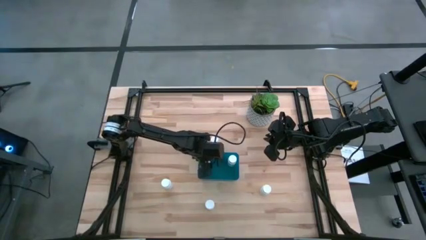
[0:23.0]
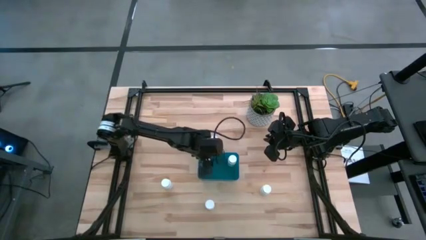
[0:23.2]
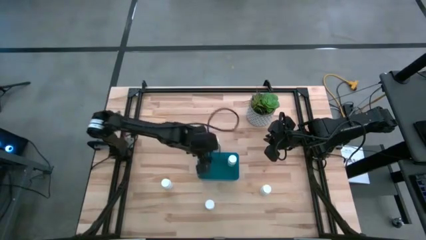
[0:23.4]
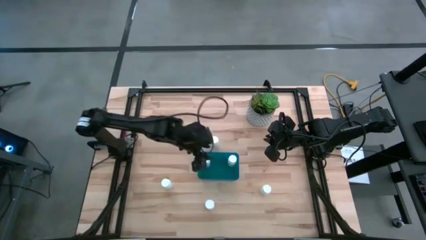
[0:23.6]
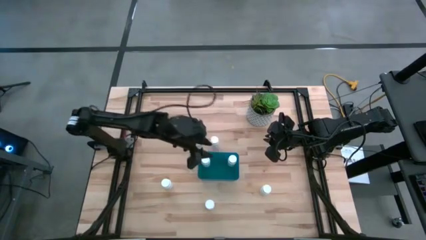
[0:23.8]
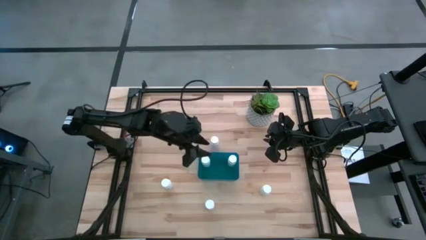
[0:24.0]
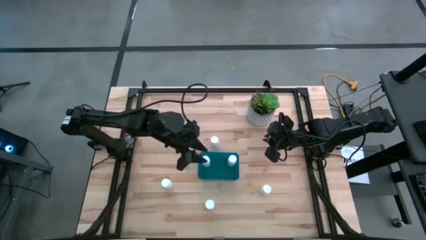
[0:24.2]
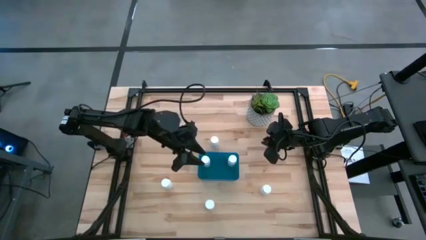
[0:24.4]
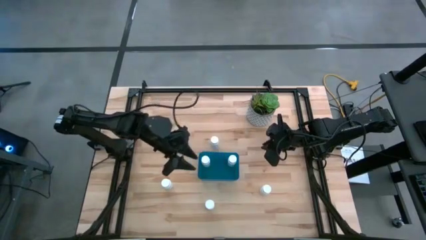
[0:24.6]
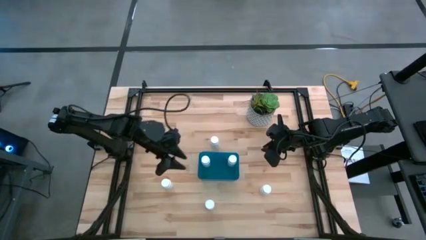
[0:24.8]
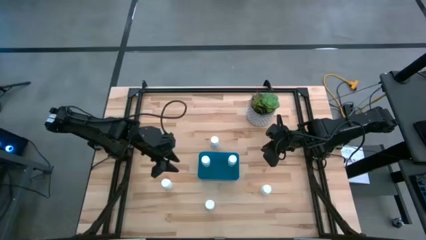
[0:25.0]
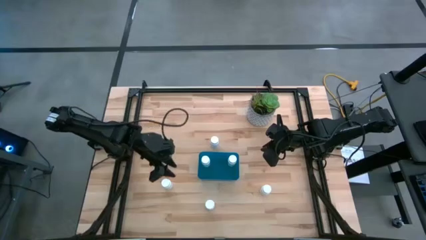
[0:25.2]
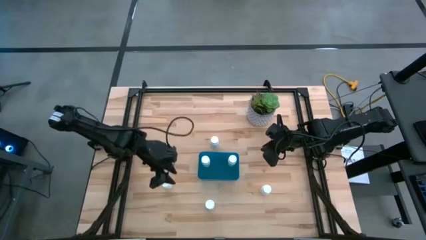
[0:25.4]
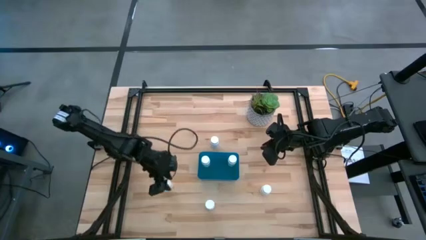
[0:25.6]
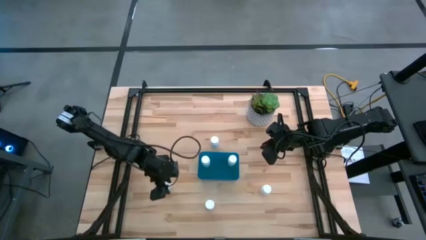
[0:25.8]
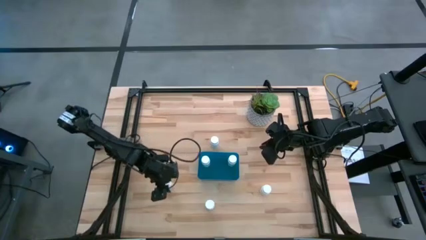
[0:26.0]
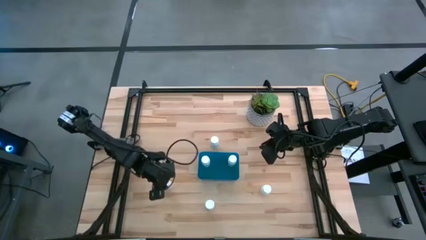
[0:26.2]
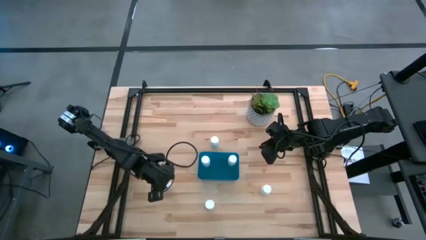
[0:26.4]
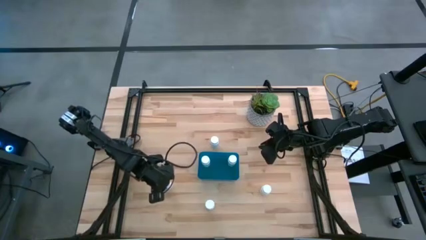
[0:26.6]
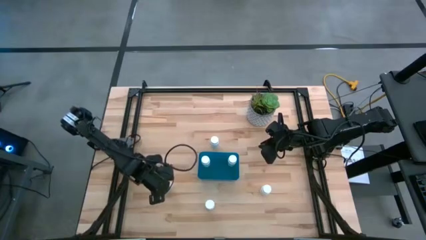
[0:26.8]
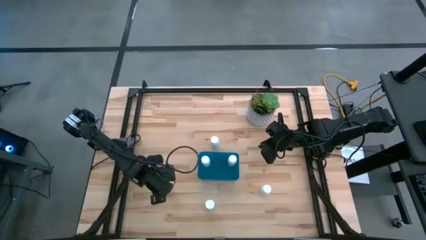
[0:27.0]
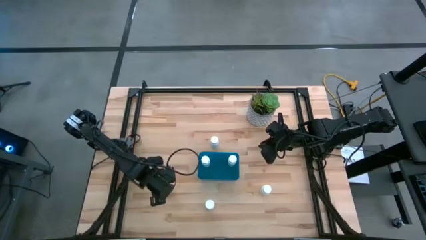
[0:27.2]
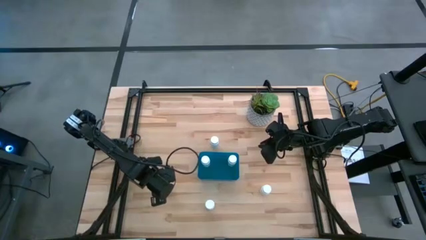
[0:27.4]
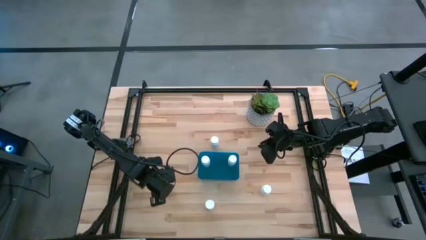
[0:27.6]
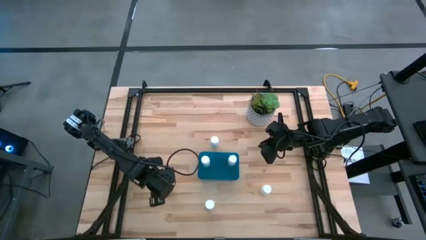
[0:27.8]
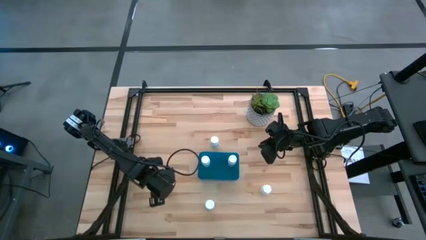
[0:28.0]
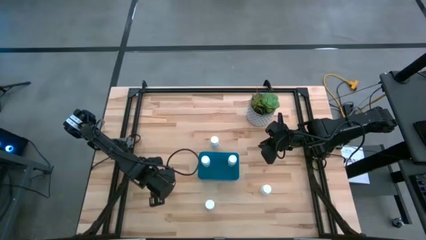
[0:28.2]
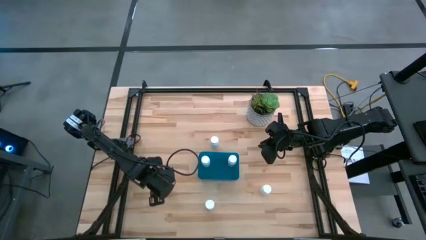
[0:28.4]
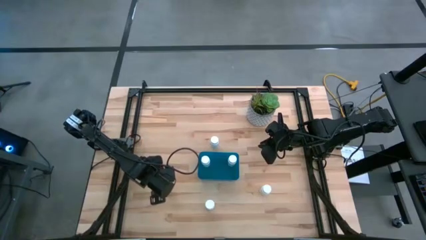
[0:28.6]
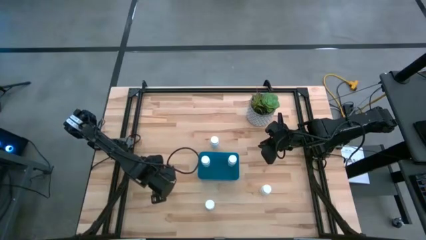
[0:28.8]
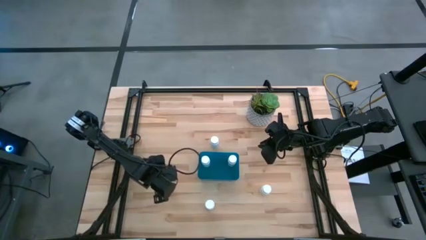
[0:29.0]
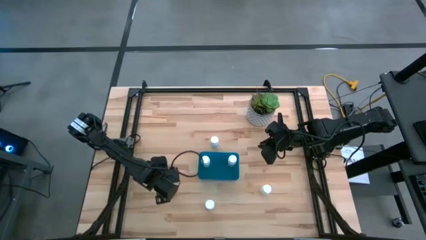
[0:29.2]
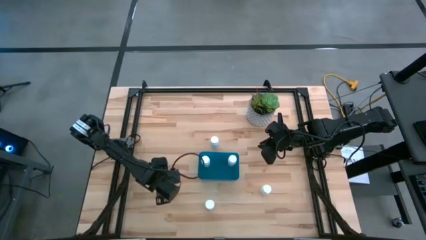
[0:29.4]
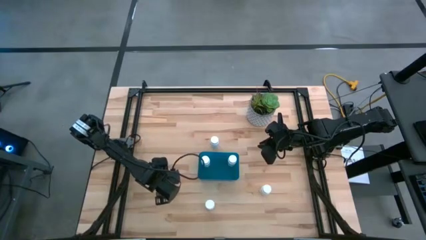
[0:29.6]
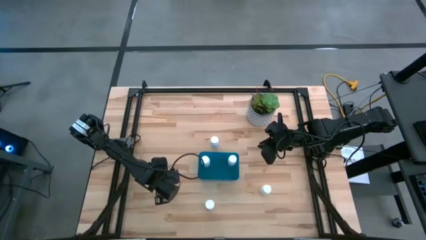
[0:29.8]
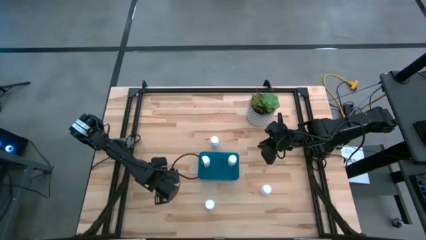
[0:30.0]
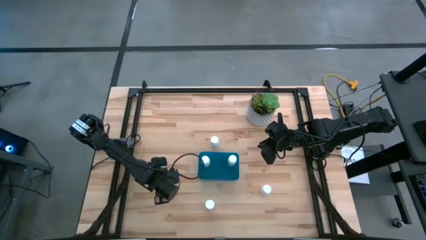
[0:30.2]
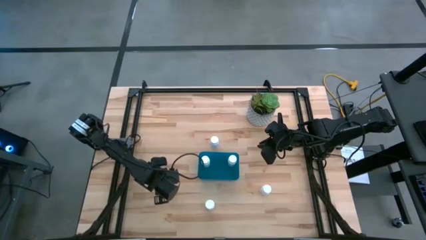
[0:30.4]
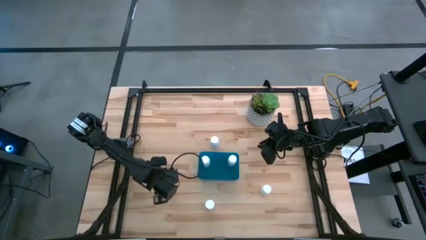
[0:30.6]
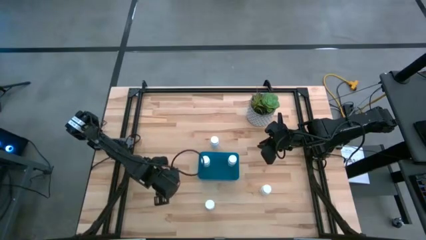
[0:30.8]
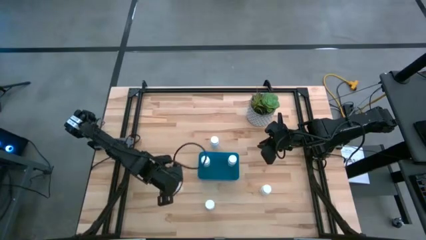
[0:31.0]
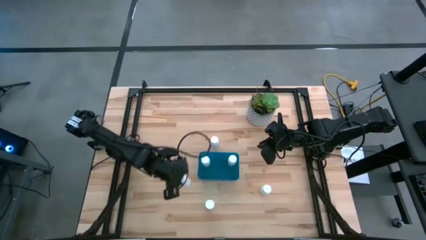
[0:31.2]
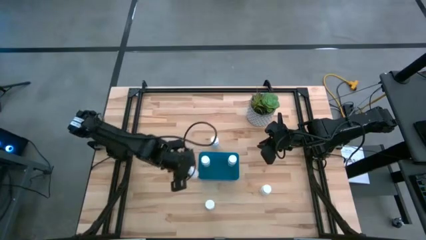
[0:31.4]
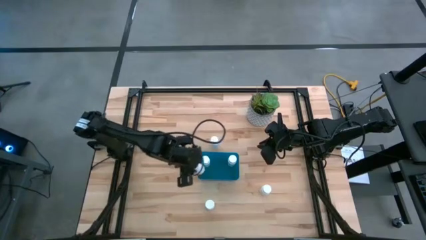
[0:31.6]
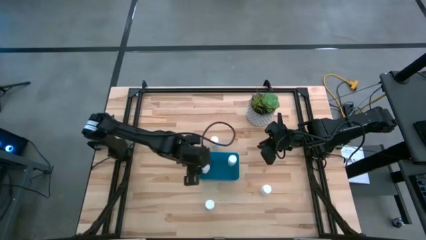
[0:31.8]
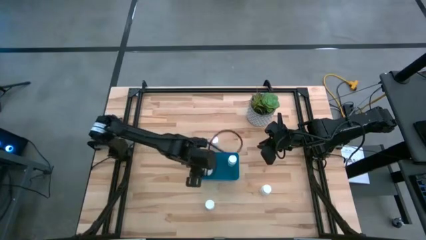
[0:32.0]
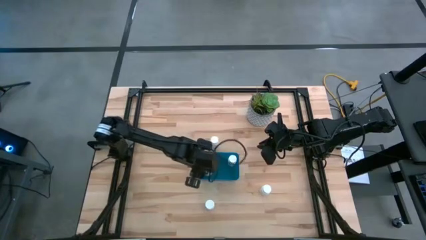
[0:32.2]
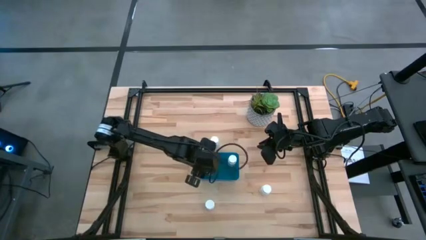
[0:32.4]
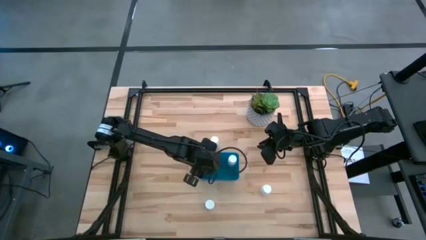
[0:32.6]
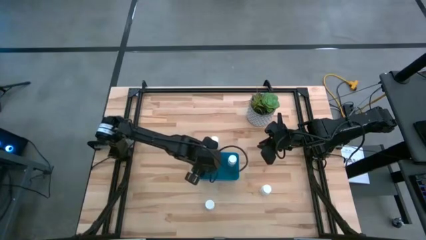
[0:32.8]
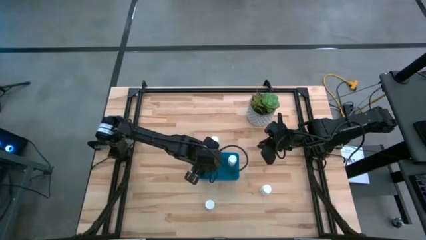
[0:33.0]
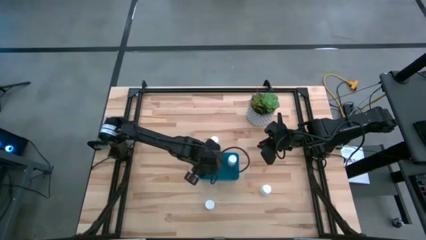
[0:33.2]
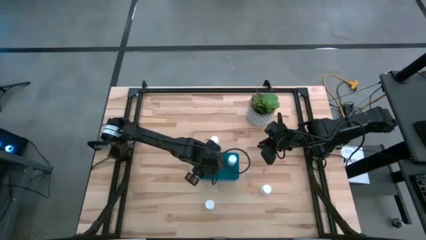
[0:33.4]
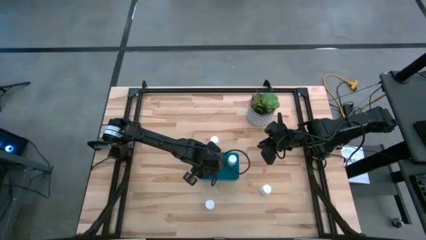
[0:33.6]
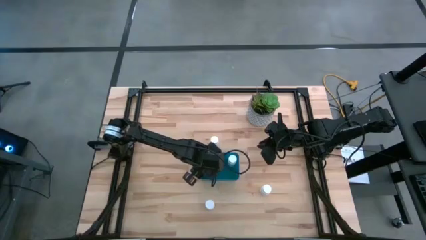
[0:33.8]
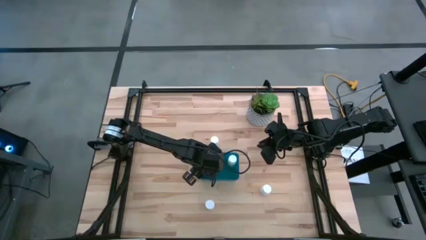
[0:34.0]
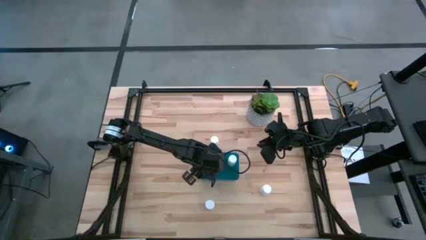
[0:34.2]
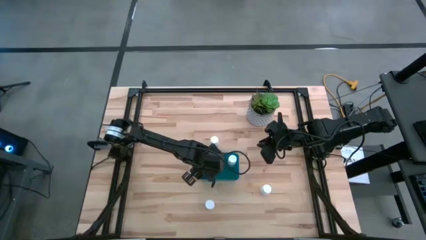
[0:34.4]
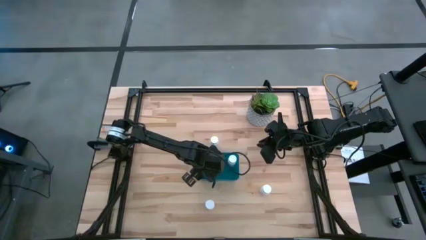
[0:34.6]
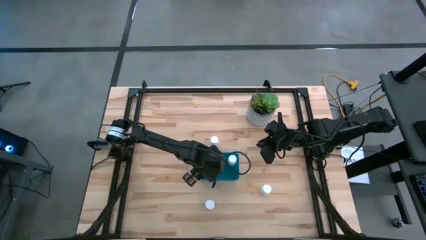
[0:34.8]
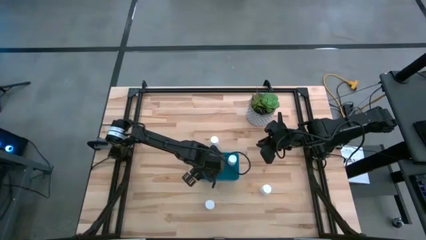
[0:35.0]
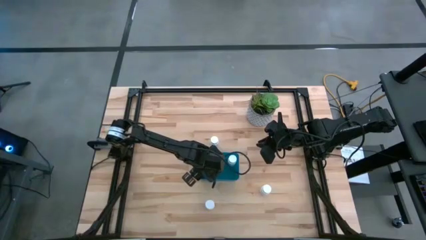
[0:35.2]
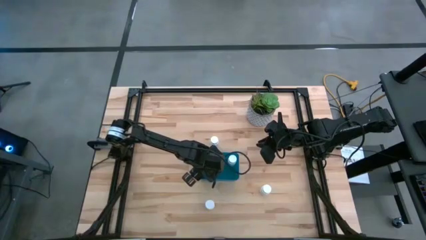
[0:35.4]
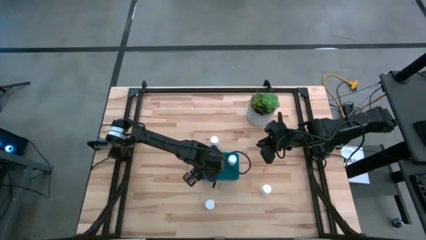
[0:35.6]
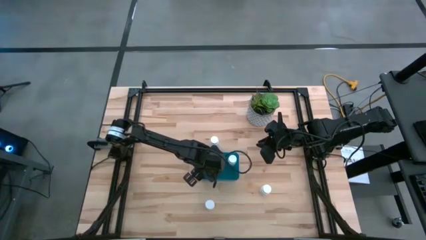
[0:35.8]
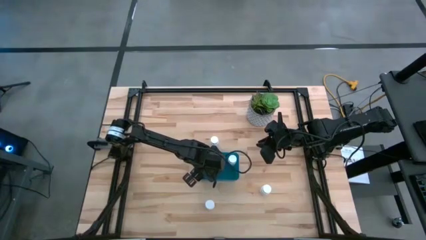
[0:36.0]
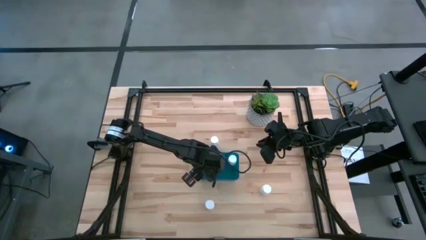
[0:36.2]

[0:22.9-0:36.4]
Task: Pick and place pill bottles into a basket
Put the white pill bottle into the blue bin
